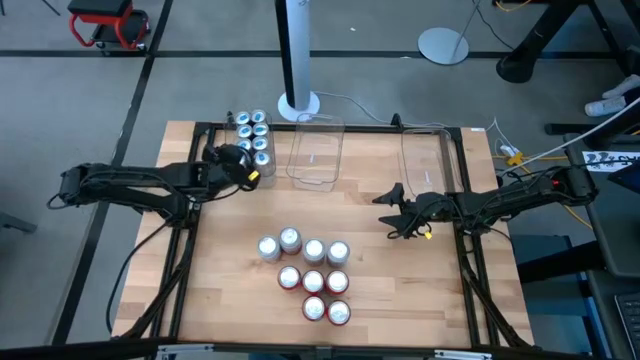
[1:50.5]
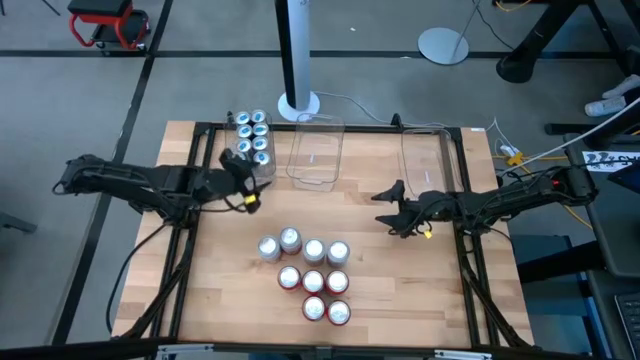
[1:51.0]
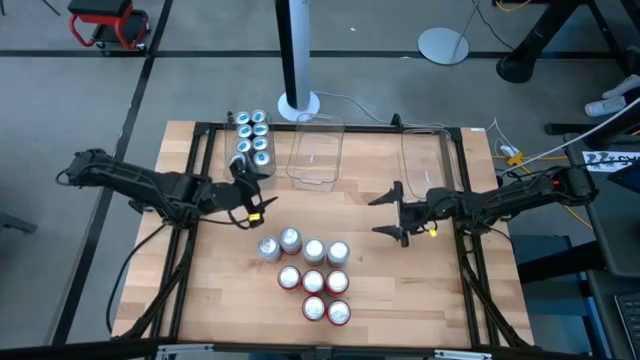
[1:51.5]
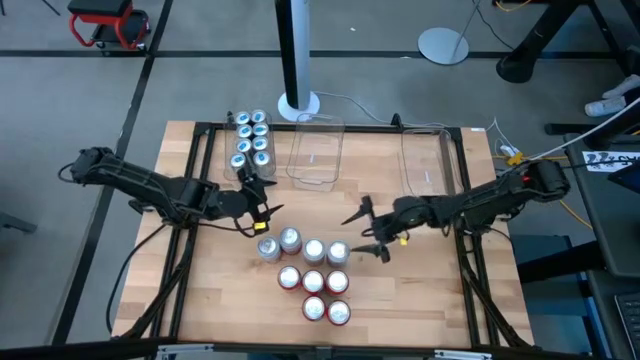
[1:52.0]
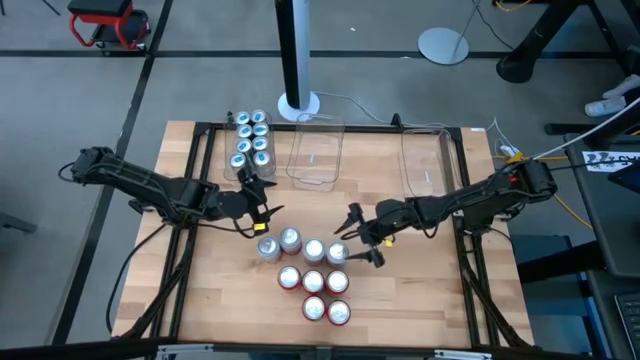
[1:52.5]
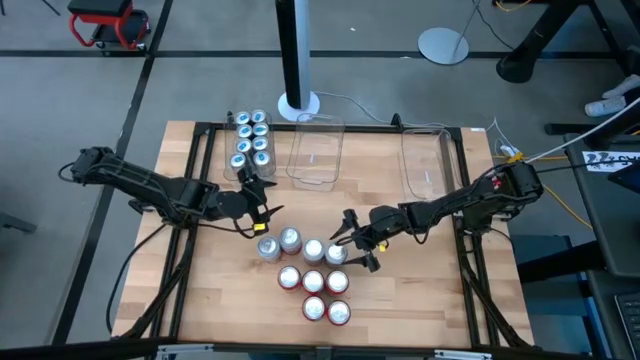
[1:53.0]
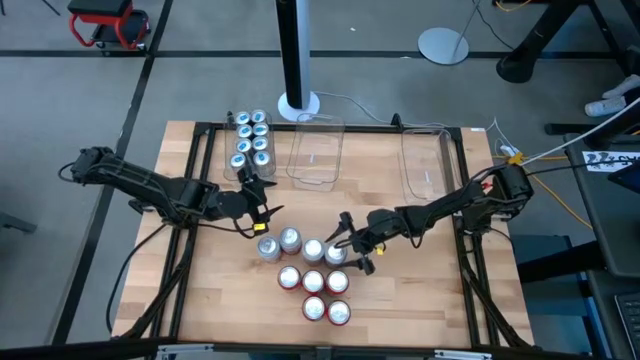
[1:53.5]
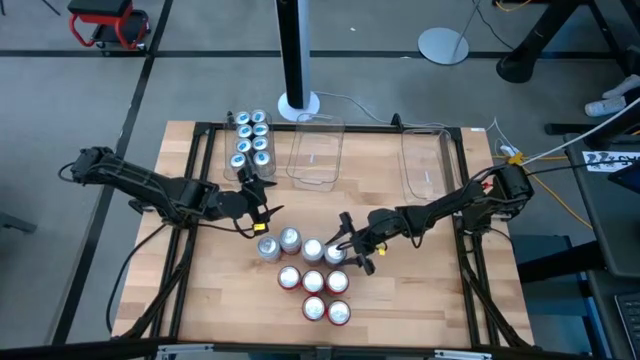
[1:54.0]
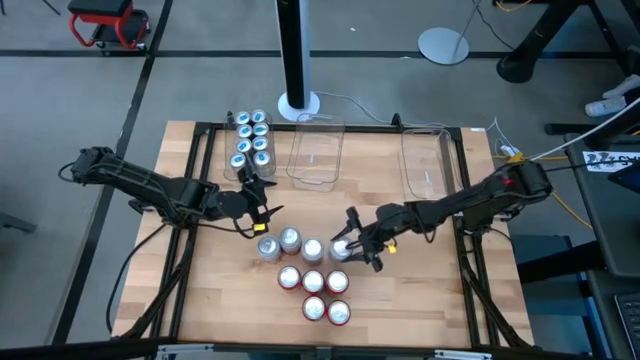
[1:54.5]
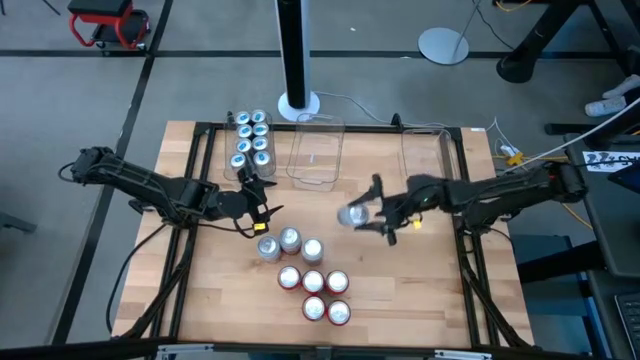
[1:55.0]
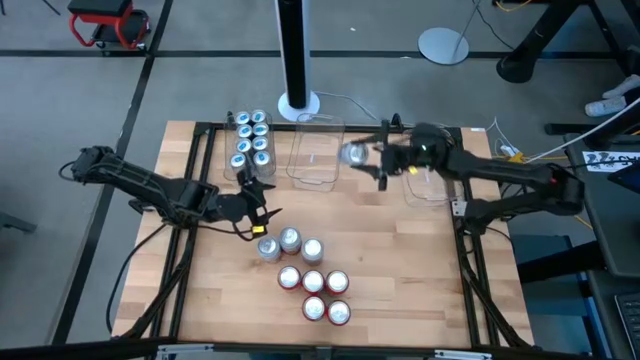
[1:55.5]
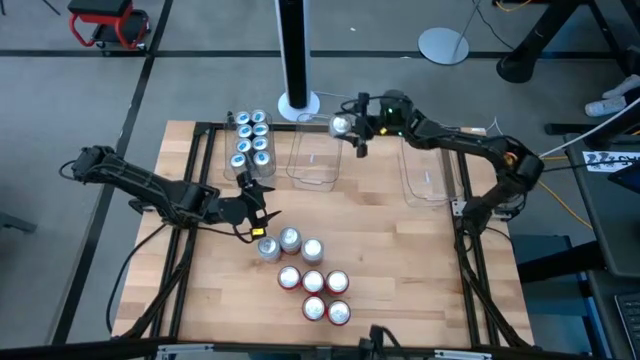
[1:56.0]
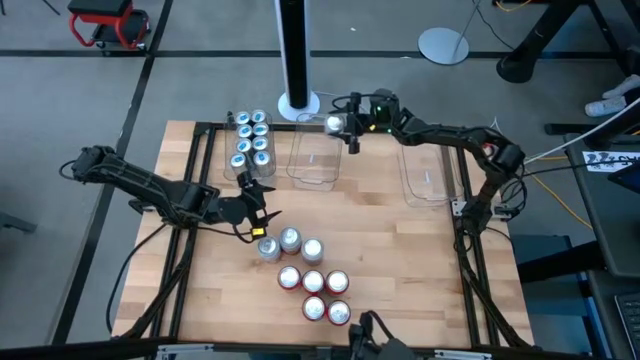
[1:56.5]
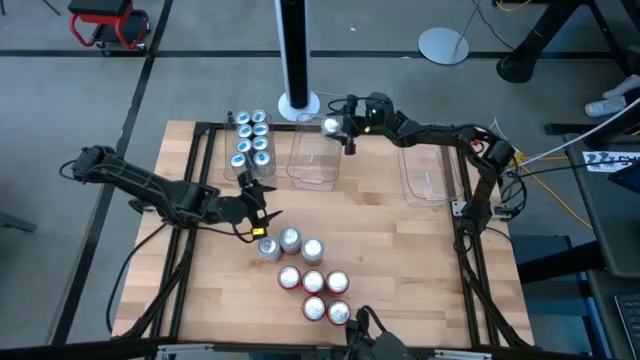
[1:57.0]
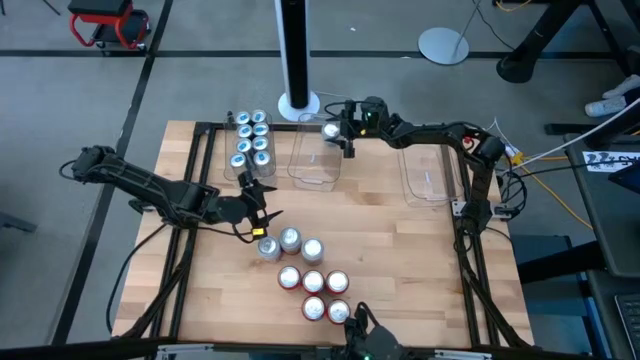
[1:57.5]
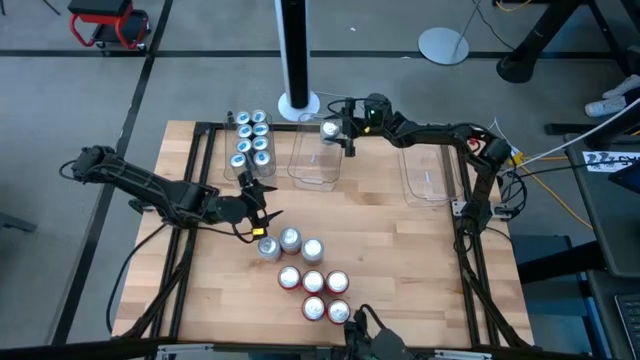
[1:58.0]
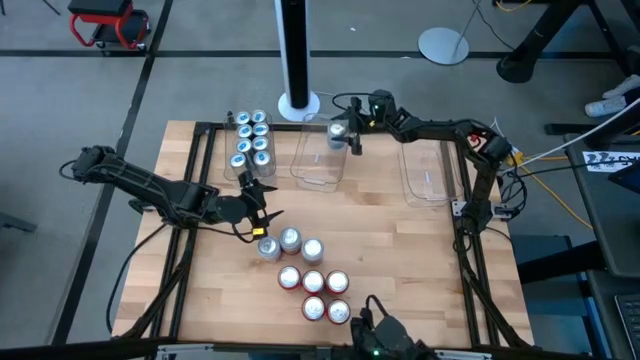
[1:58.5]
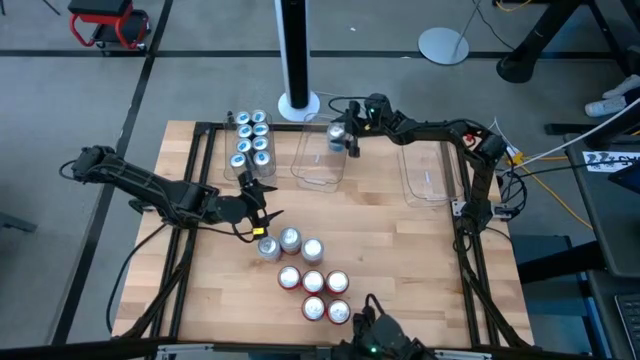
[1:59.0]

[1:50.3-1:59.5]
Task: Sort soda cans
Put the blue-white soda can into the middle transparent bin

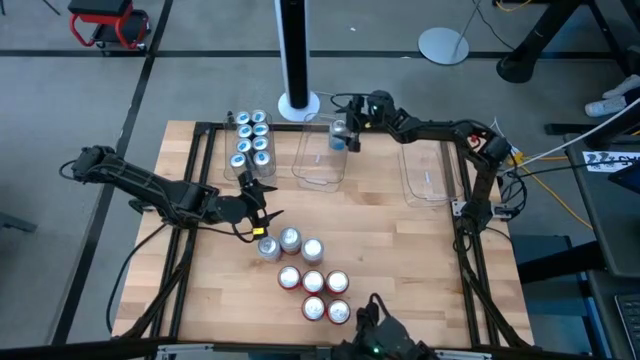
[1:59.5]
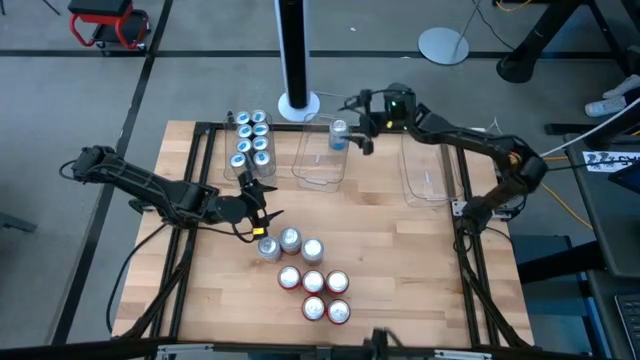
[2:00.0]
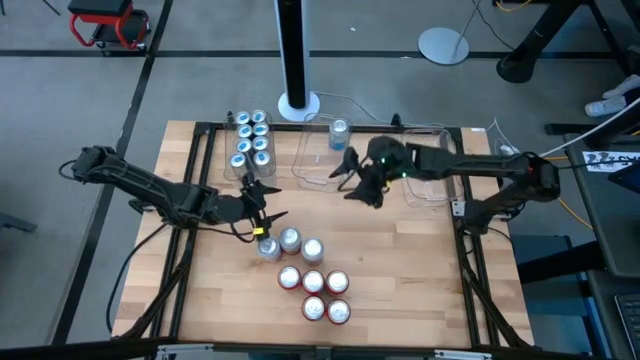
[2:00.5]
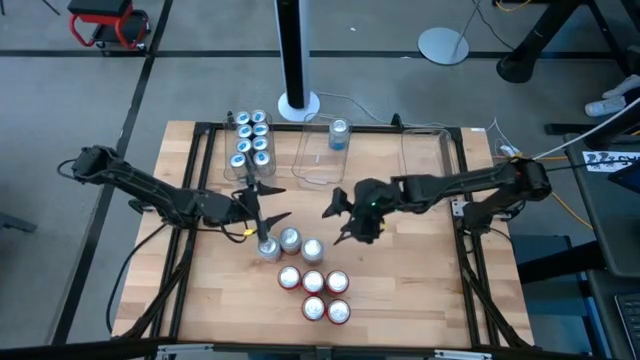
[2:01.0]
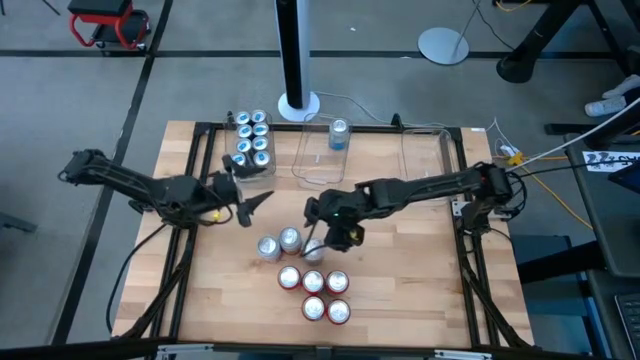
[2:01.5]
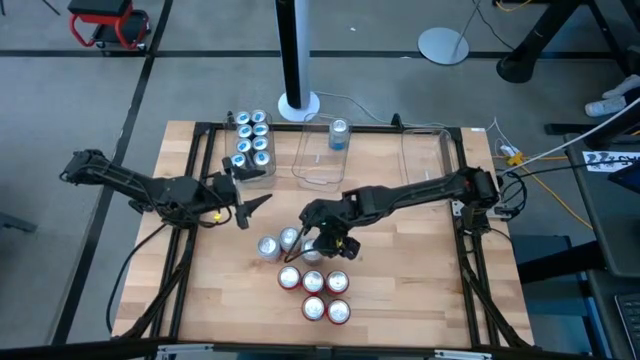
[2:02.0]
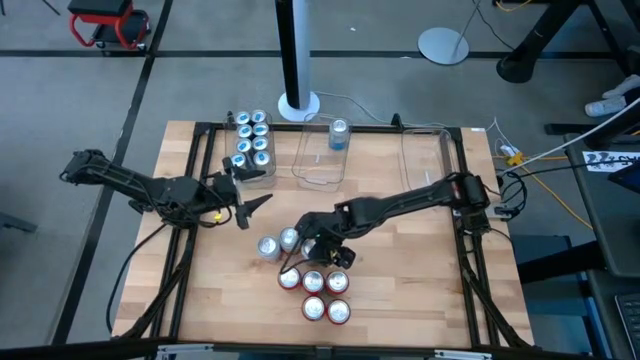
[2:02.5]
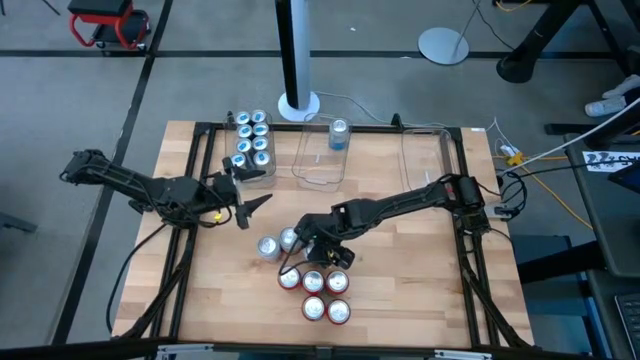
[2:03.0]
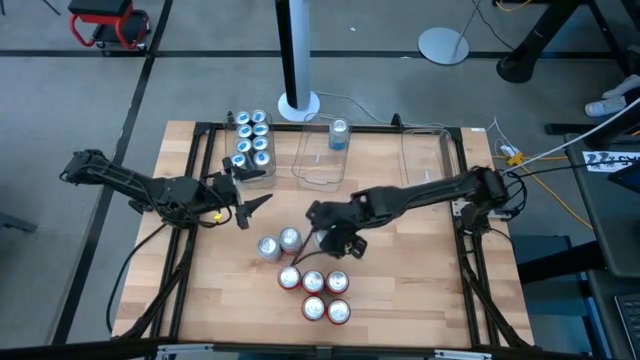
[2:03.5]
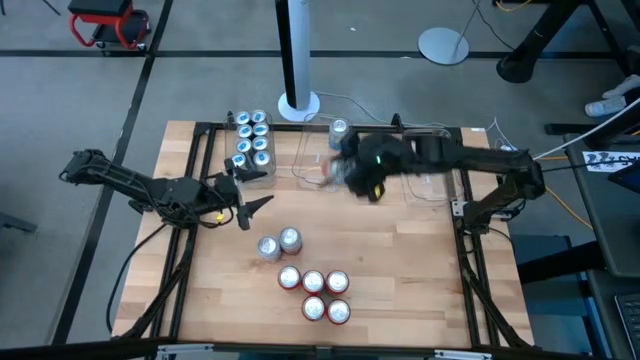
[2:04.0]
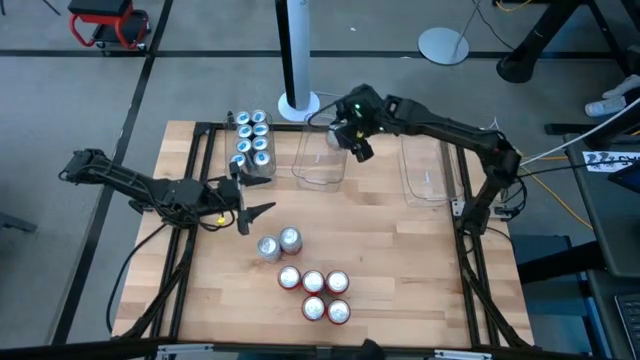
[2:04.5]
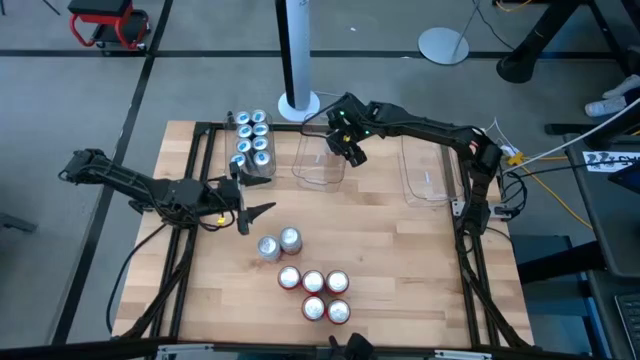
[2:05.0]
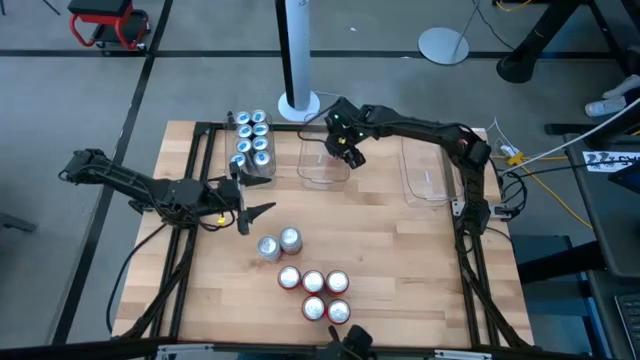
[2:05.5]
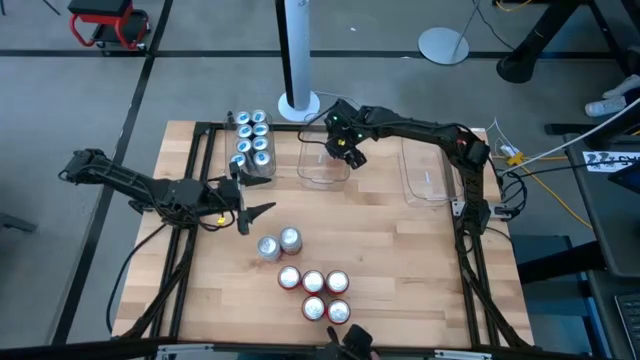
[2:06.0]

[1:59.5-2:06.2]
Put the orange-white soda can into the middle transparent bin

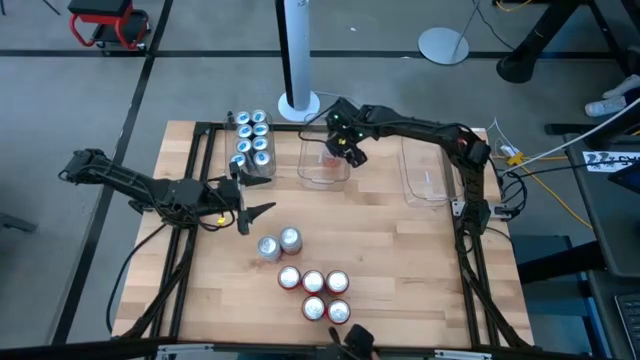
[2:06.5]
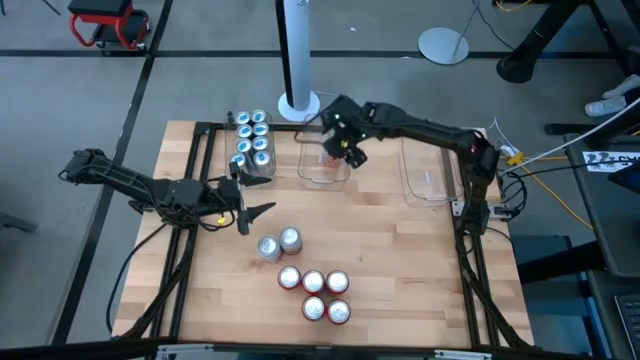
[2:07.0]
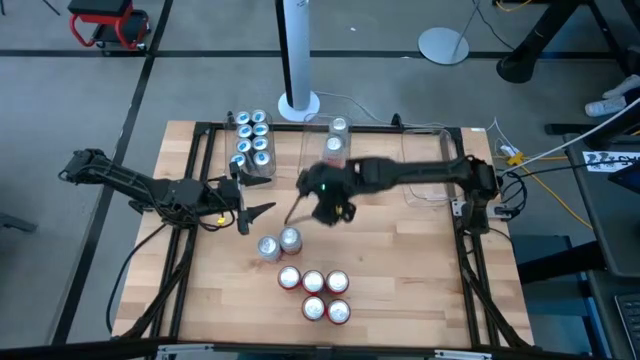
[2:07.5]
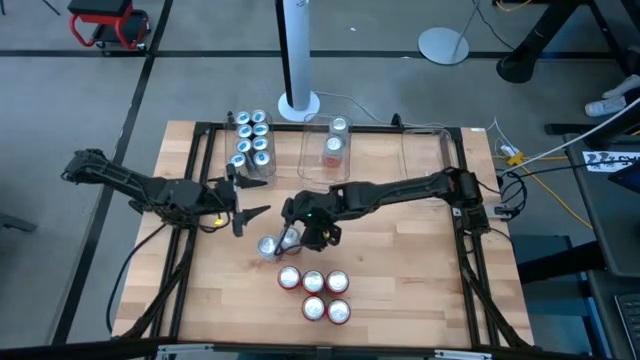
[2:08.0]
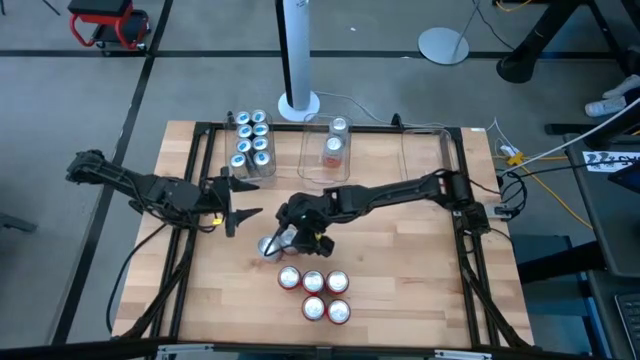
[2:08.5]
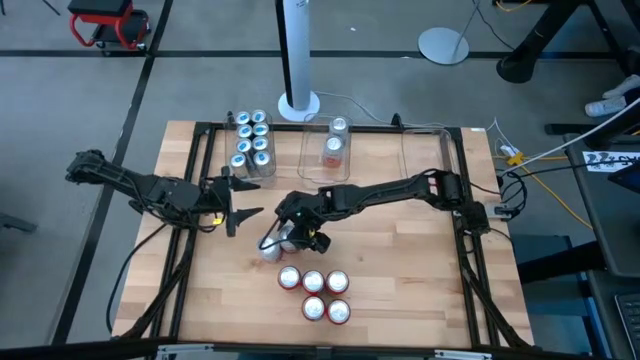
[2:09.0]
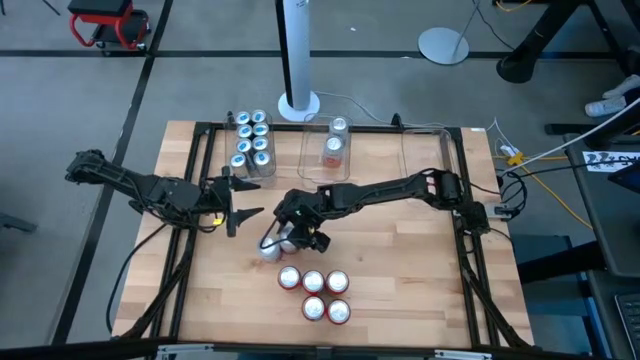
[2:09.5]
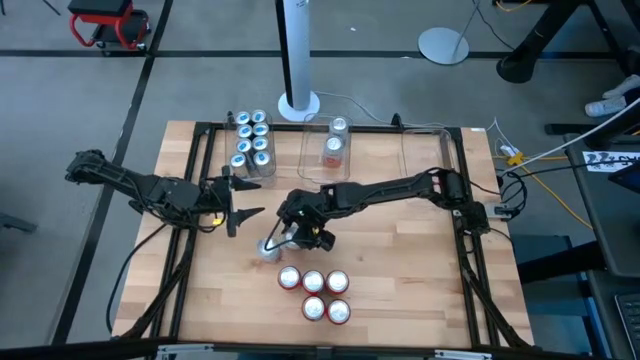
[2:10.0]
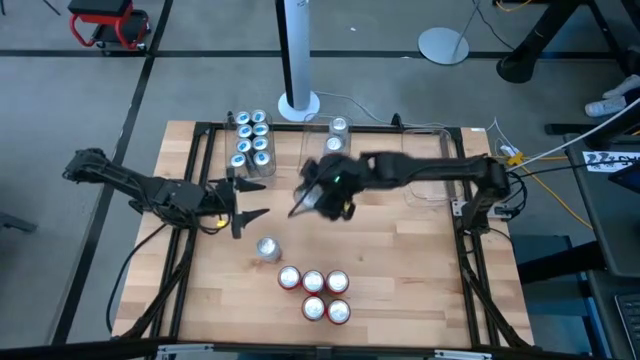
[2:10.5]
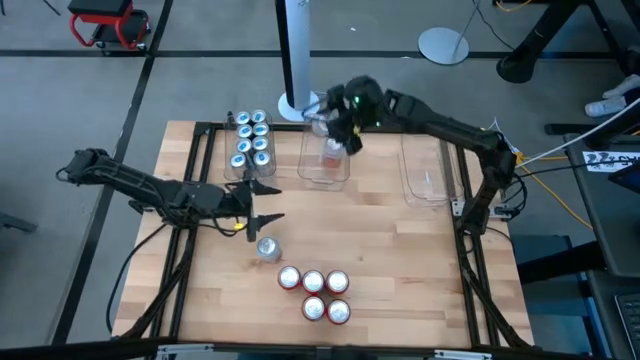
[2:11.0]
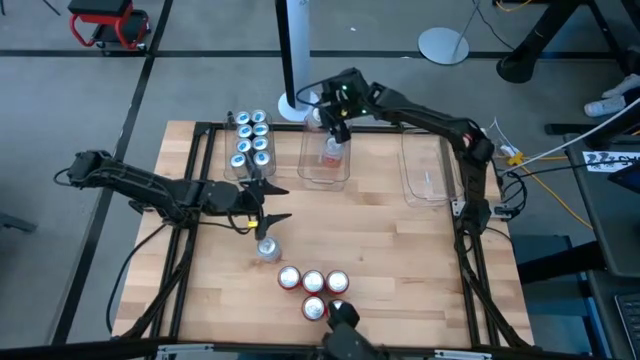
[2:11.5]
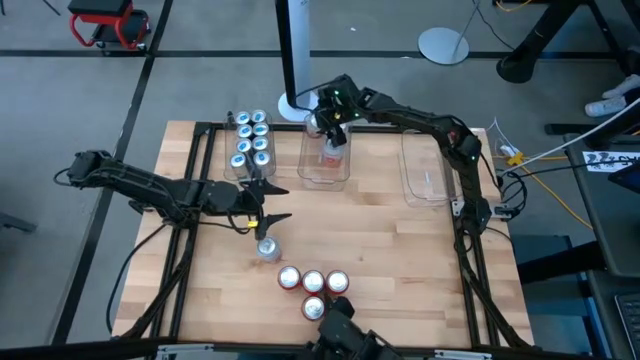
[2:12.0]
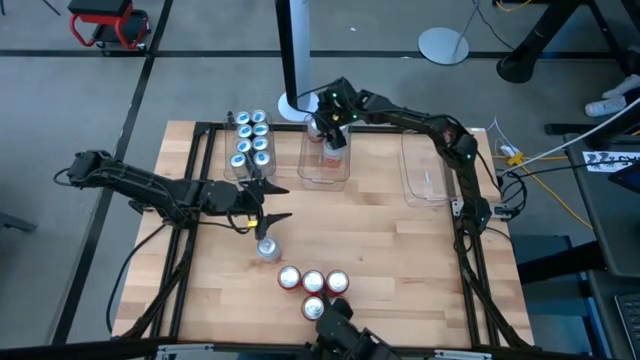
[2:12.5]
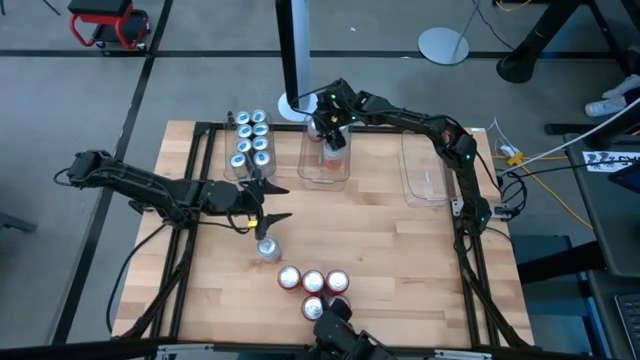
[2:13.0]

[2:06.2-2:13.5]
Put the pink-white soda can into the middle transparent bin
